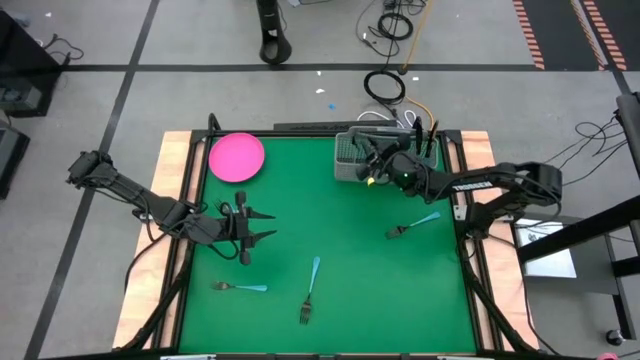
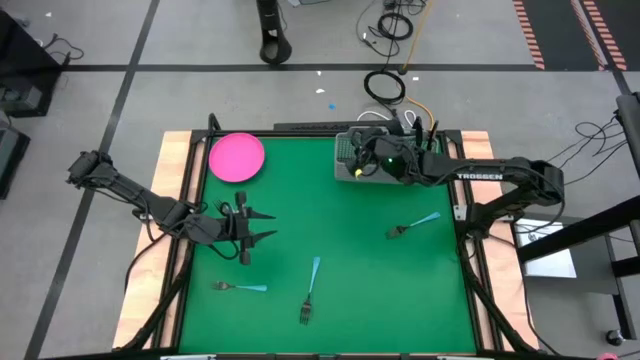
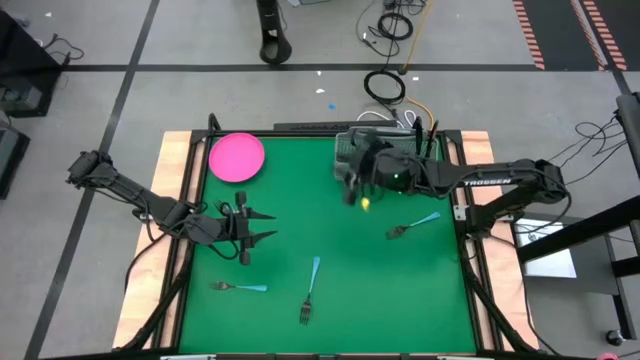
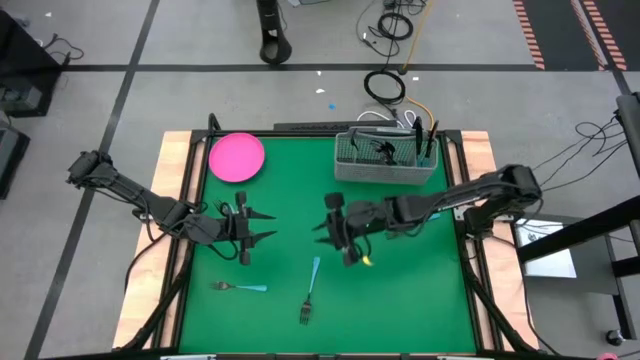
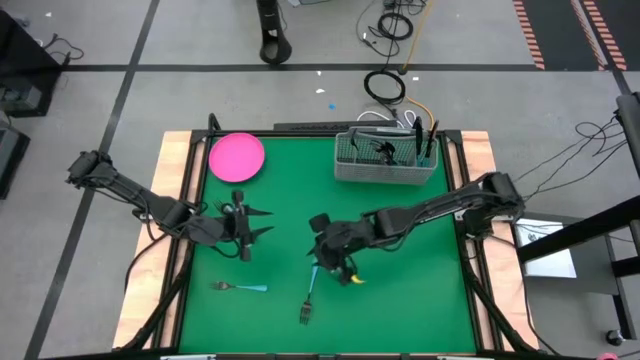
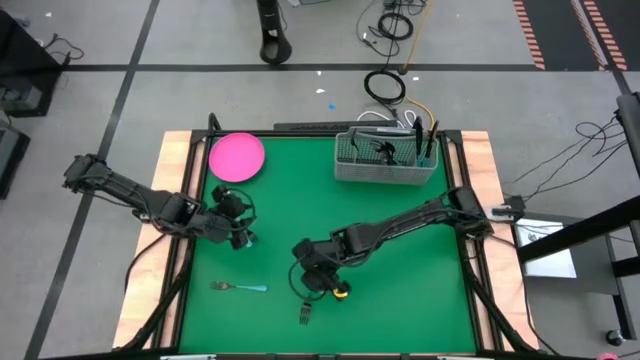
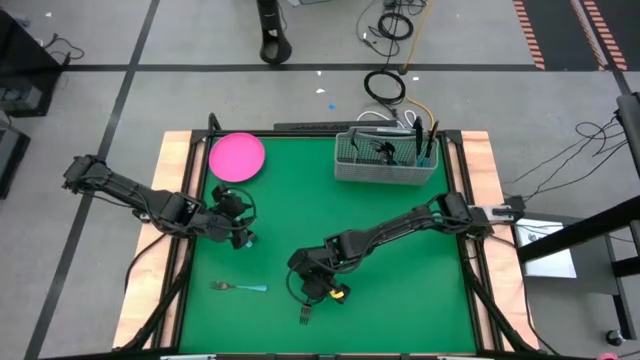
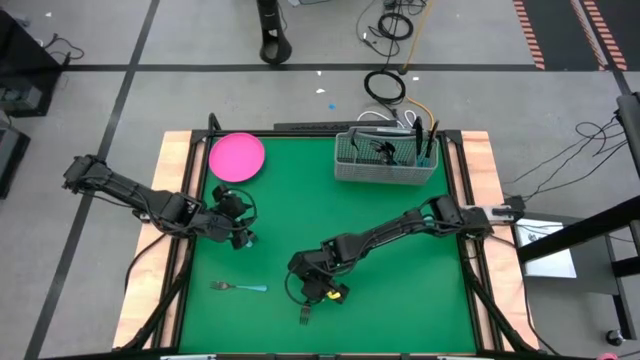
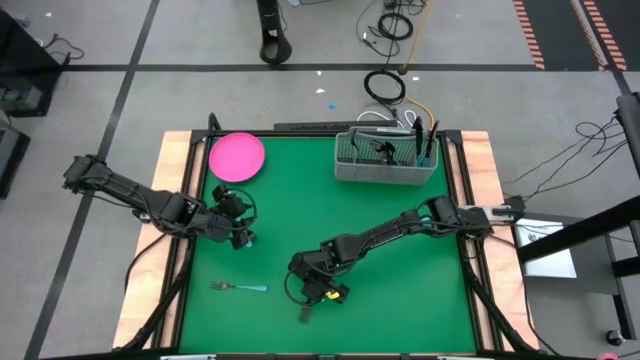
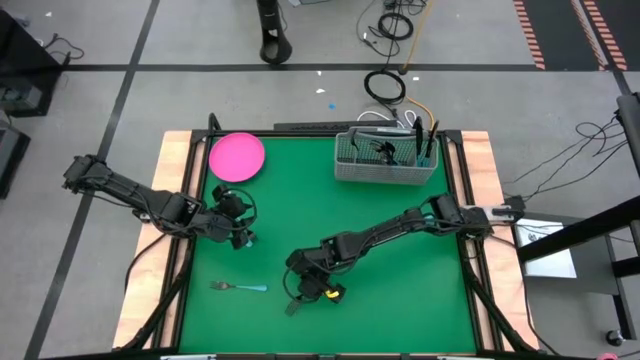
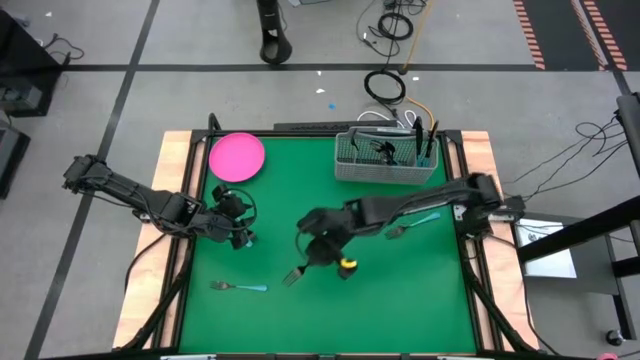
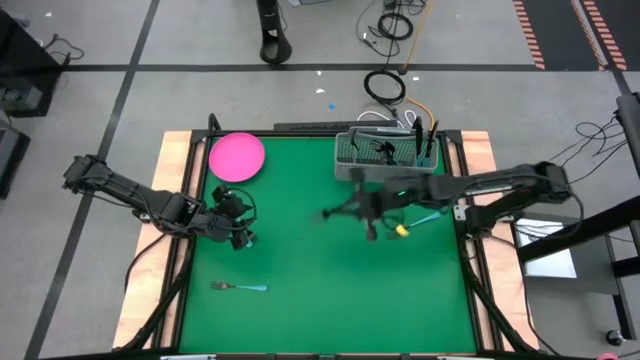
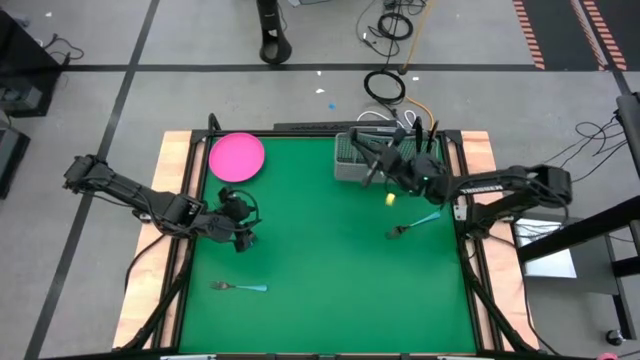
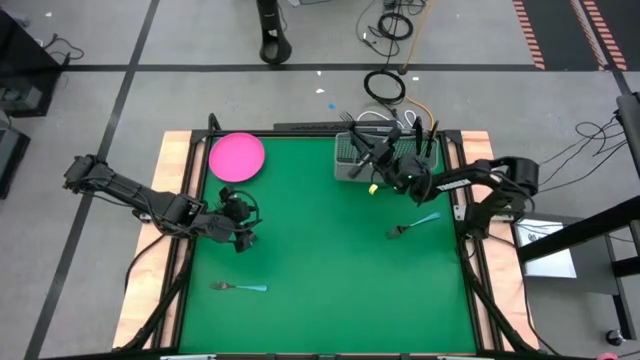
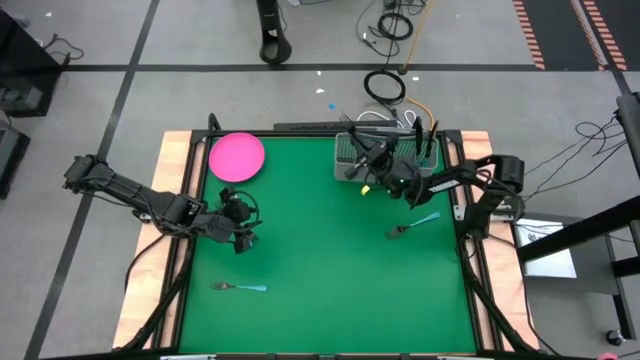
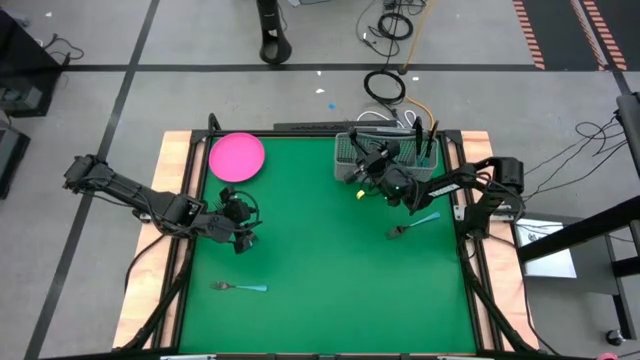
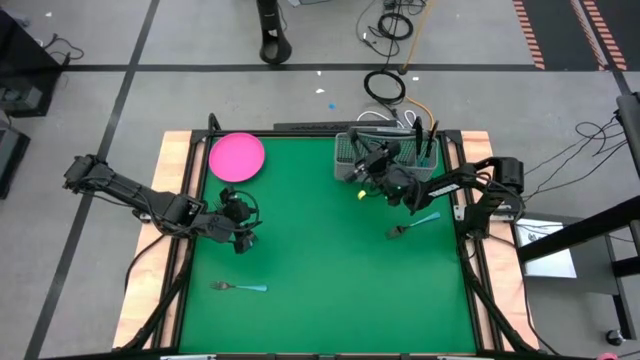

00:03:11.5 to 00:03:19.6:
Task: Sort silverware
Put the bottom right black fork into the cutlery rack with the other black fork

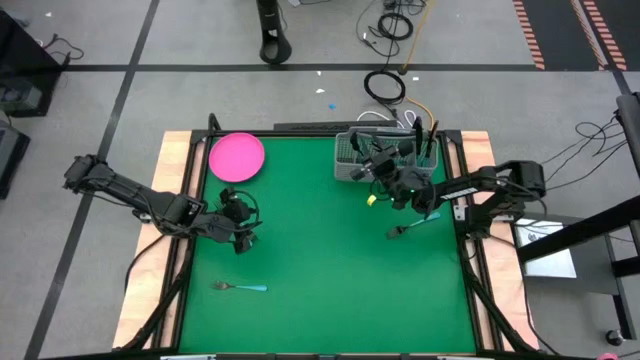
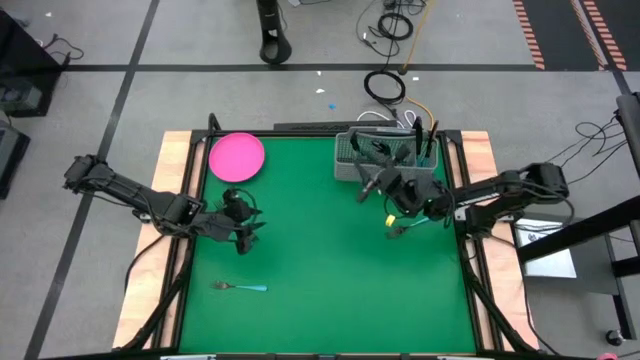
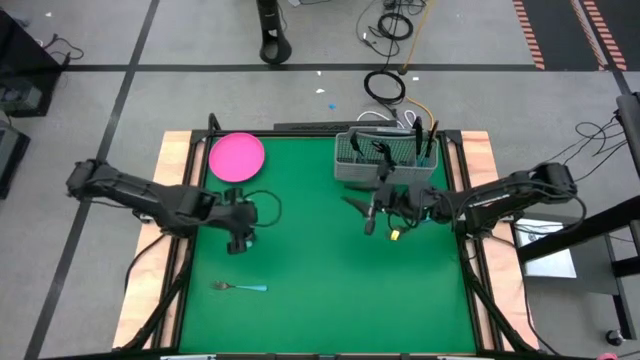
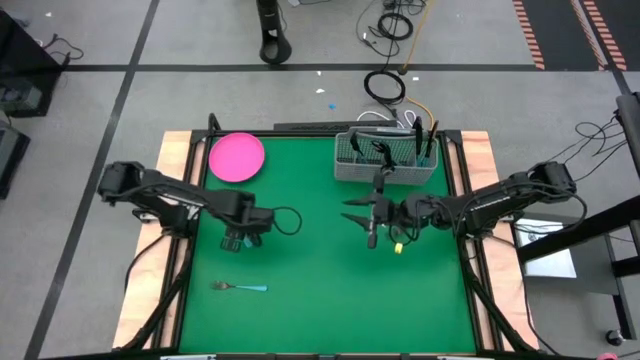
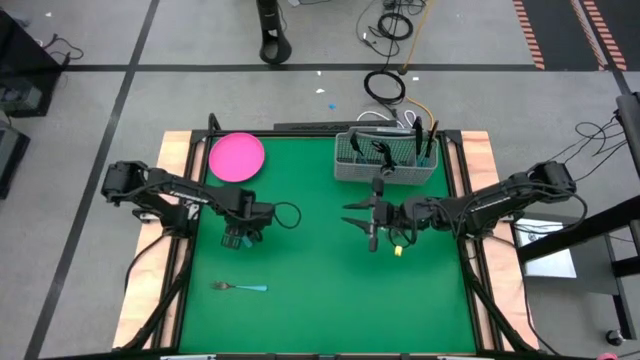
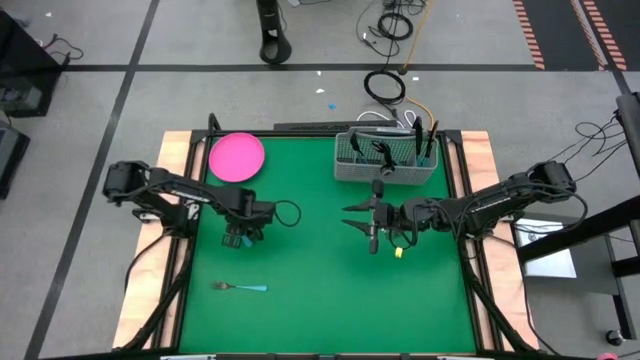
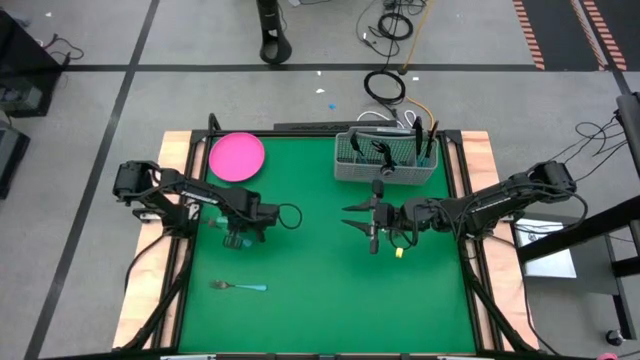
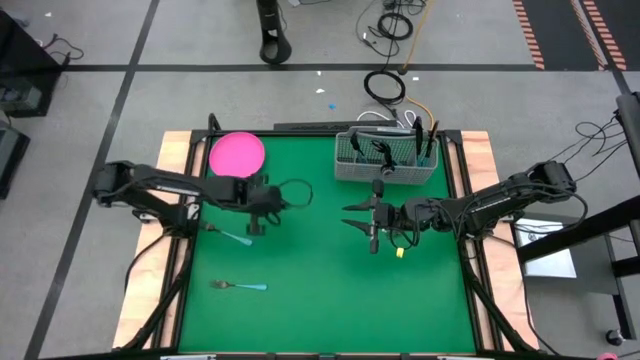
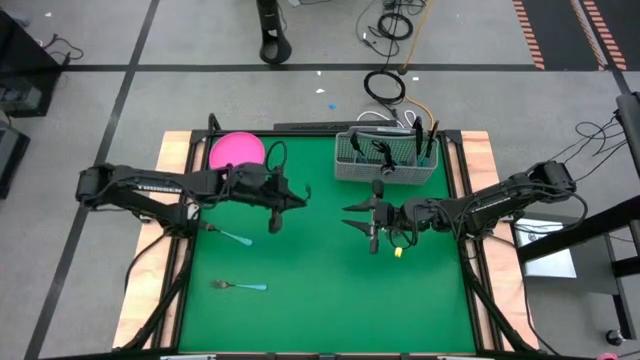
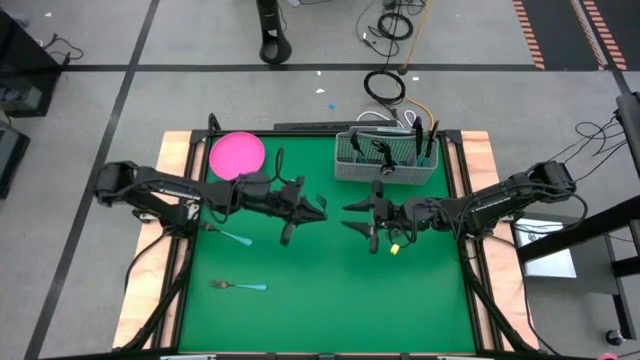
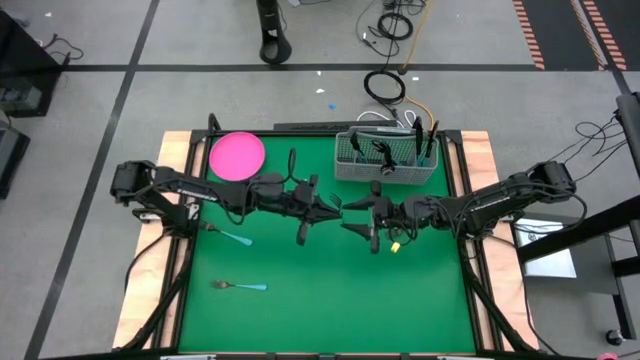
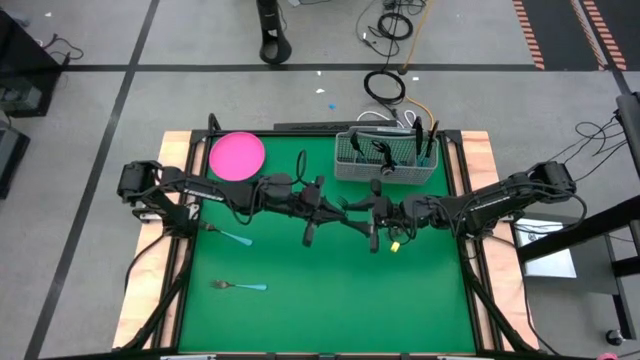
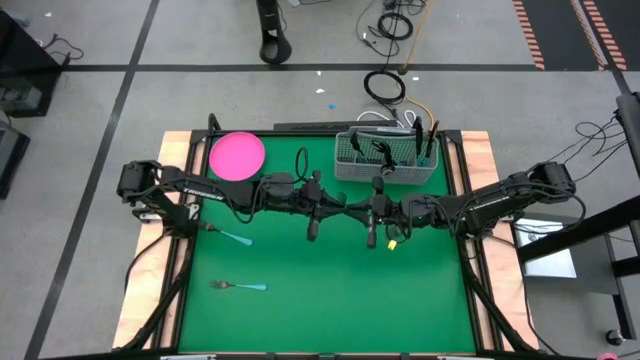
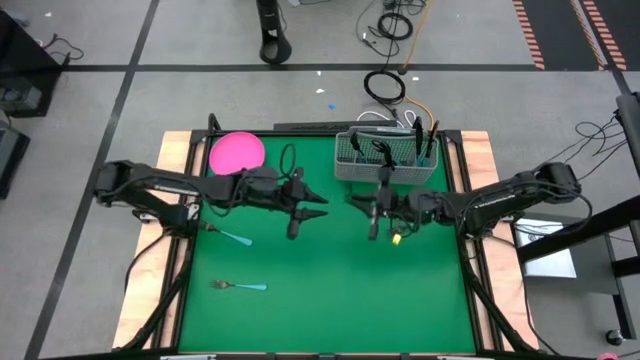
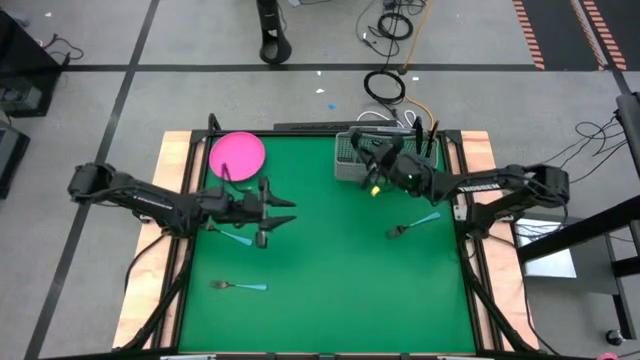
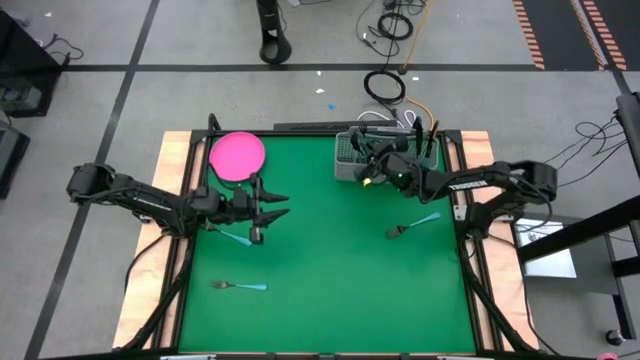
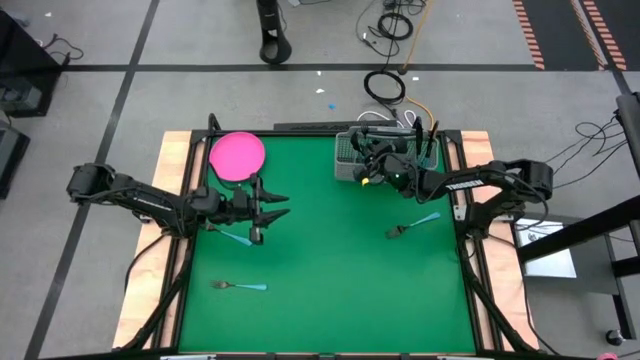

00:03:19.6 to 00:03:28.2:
Put the top left black fork into the cutlery rack with the other black forks

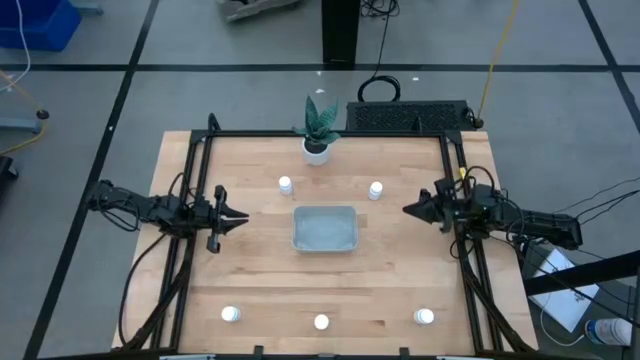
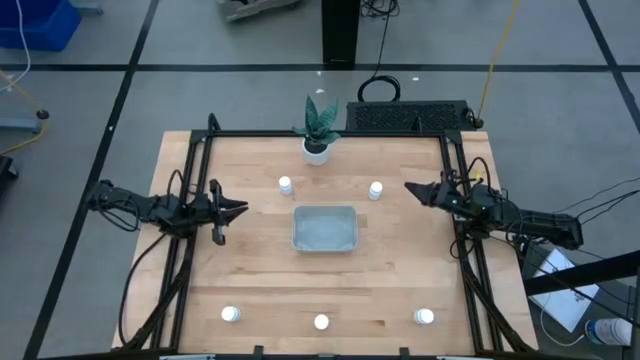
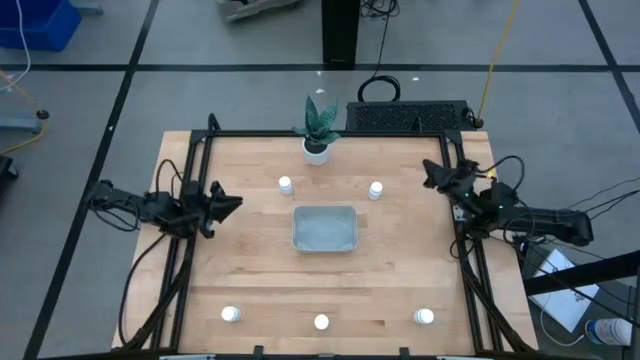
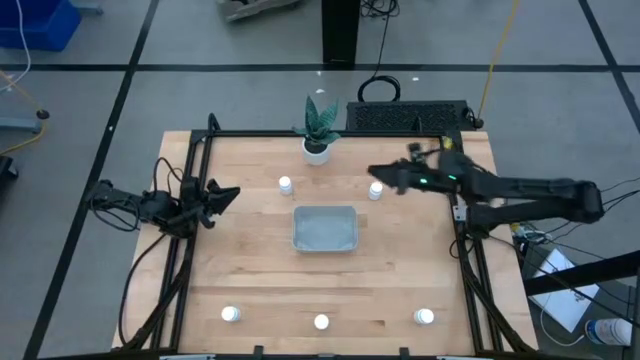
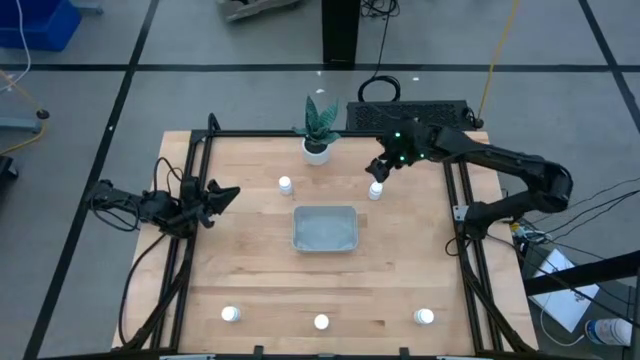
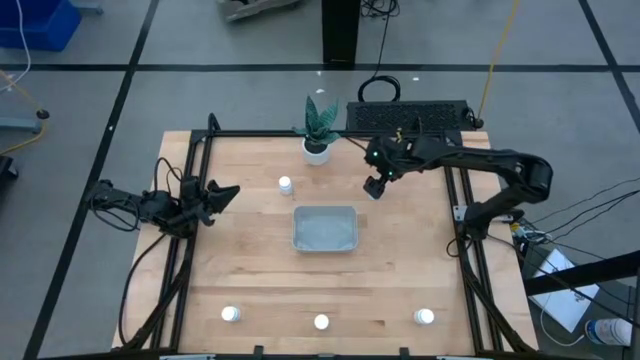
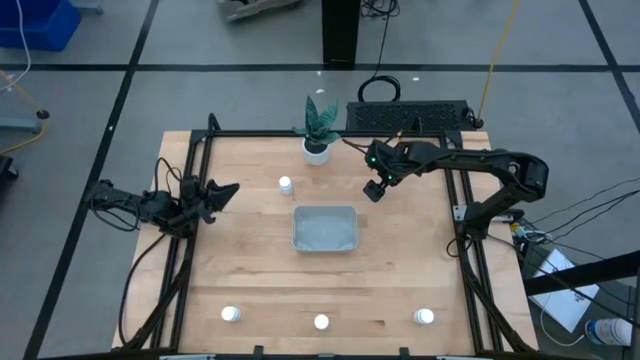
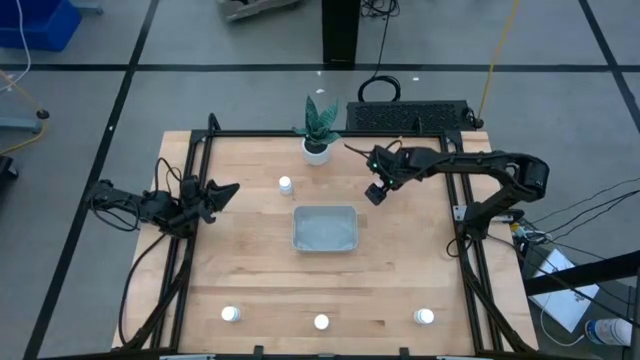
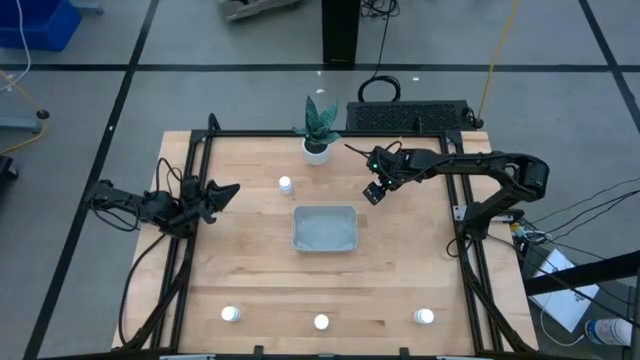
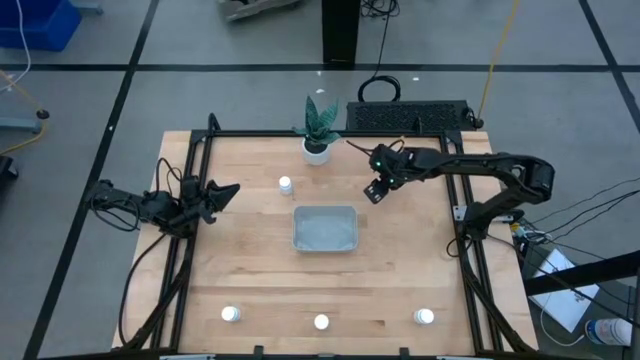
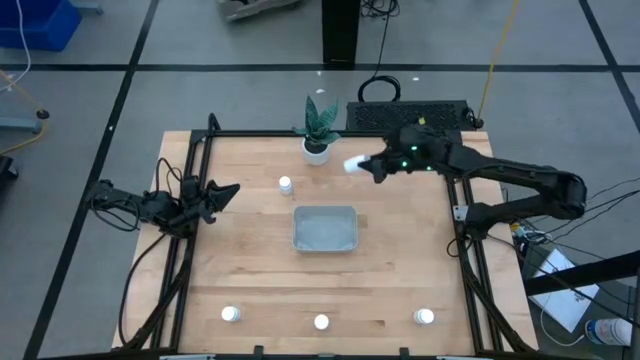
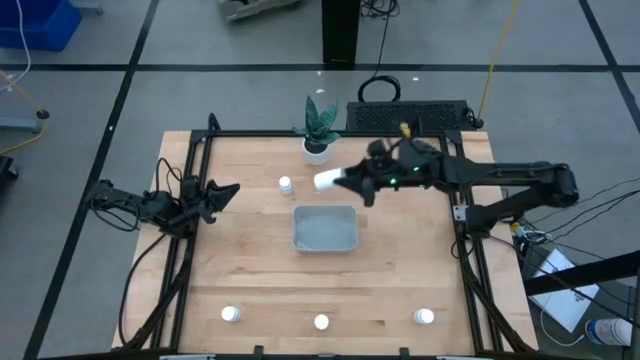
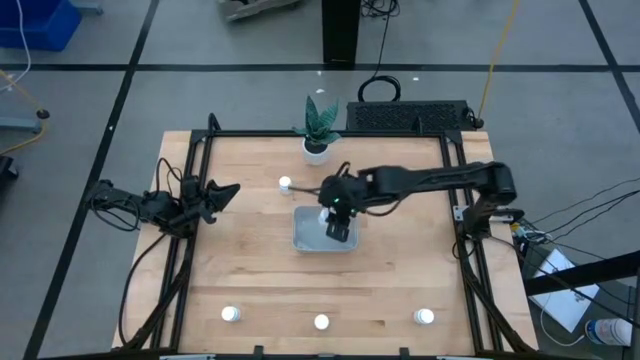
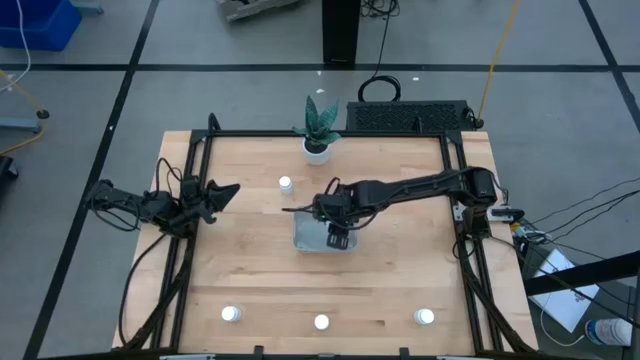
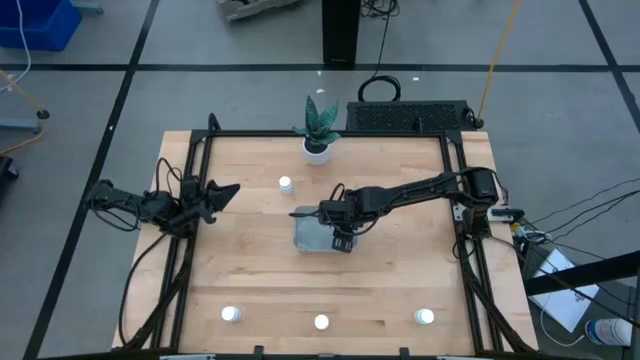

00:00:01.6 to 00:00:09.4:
Task: Pick and place pill bottles into a basket
Put the white pill bottle into the gray bin
